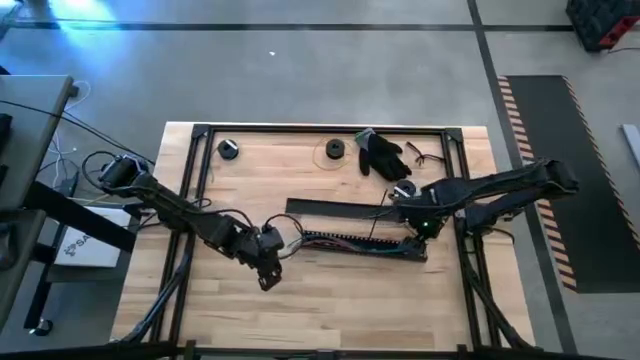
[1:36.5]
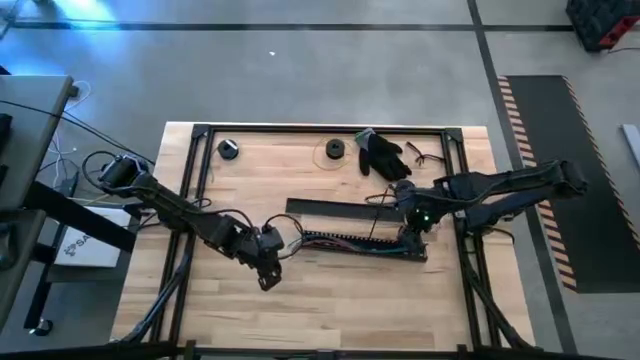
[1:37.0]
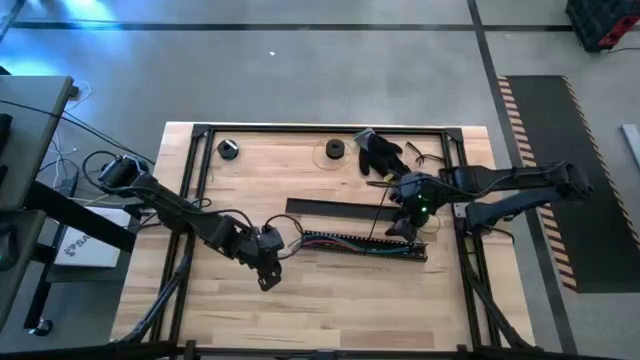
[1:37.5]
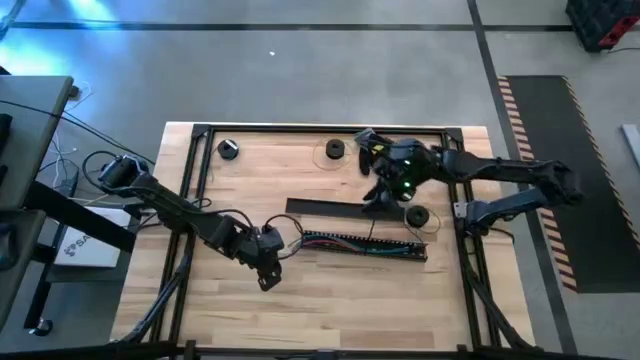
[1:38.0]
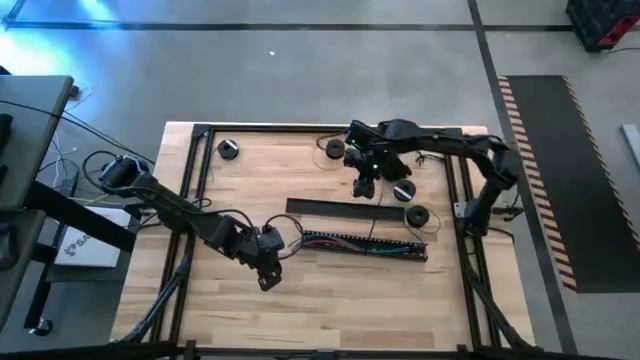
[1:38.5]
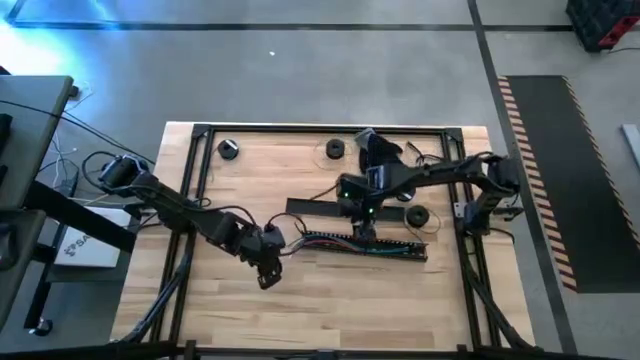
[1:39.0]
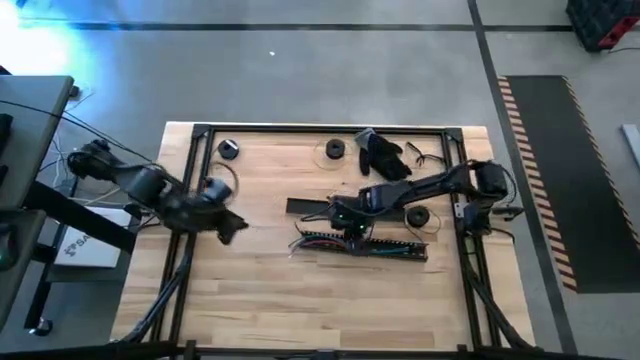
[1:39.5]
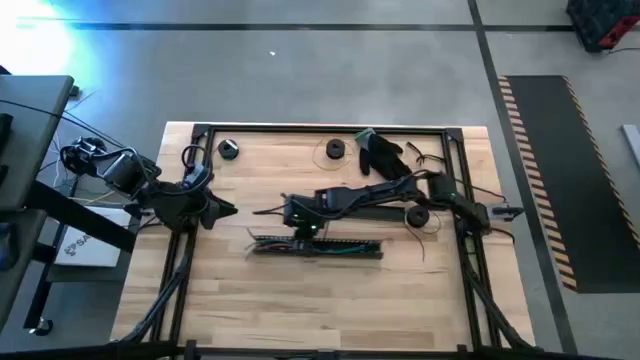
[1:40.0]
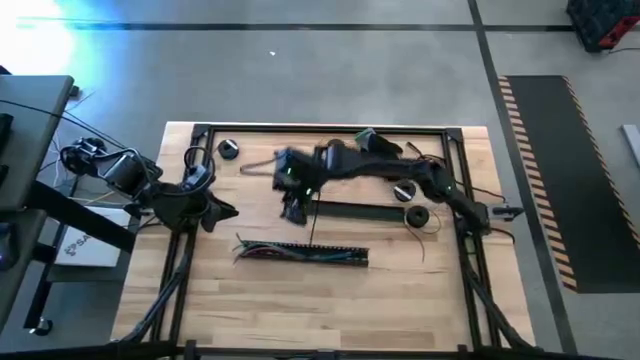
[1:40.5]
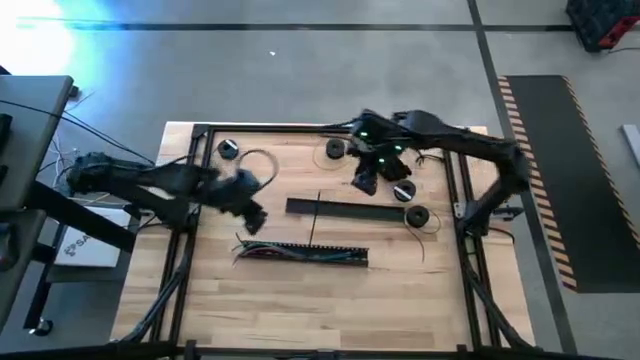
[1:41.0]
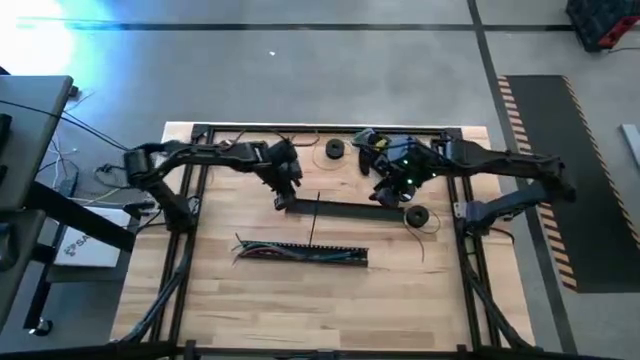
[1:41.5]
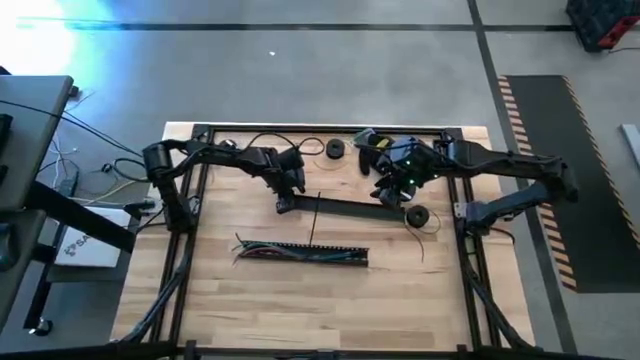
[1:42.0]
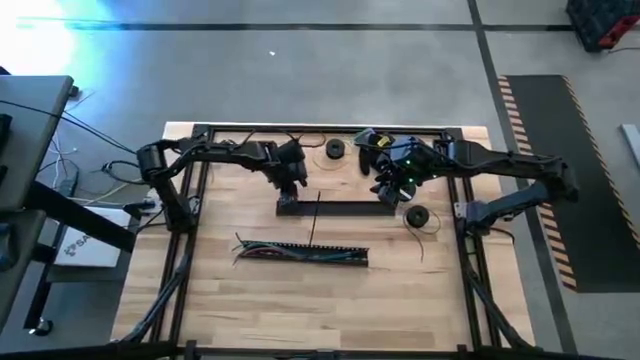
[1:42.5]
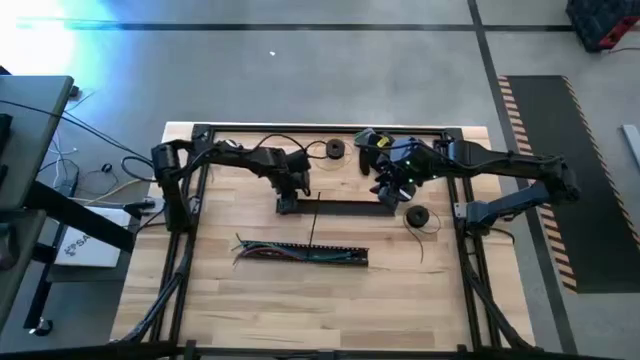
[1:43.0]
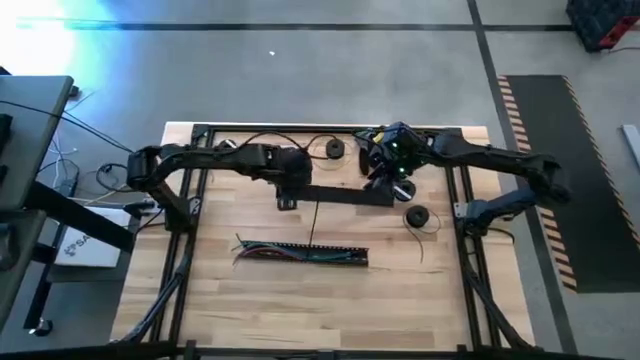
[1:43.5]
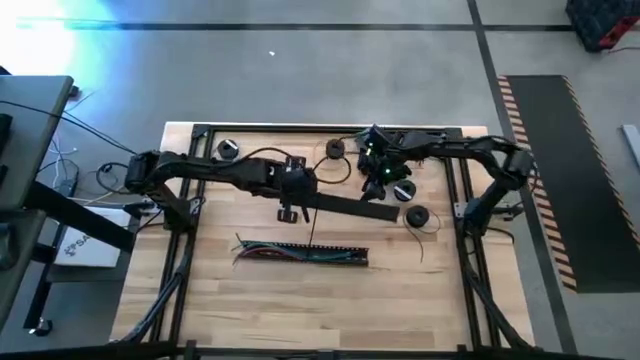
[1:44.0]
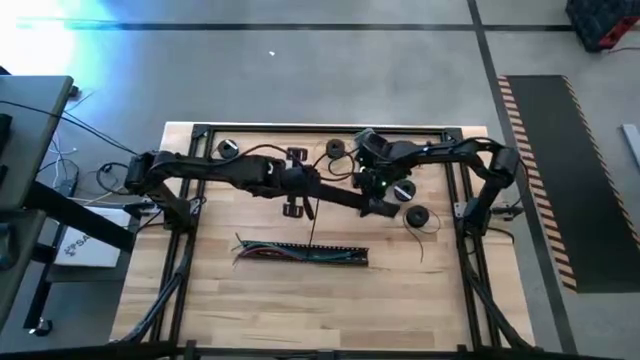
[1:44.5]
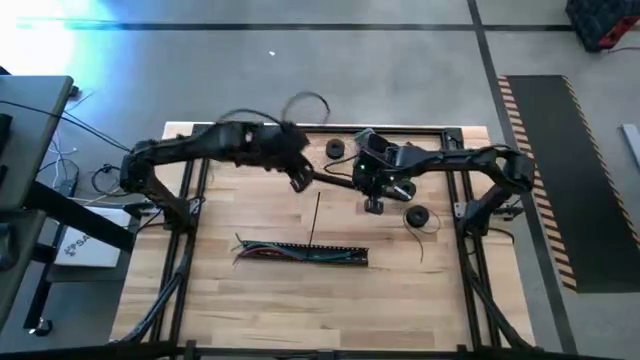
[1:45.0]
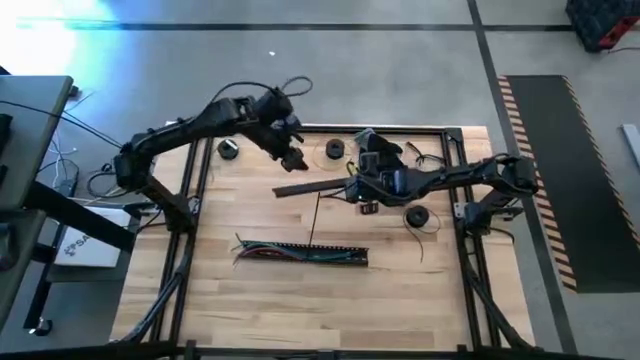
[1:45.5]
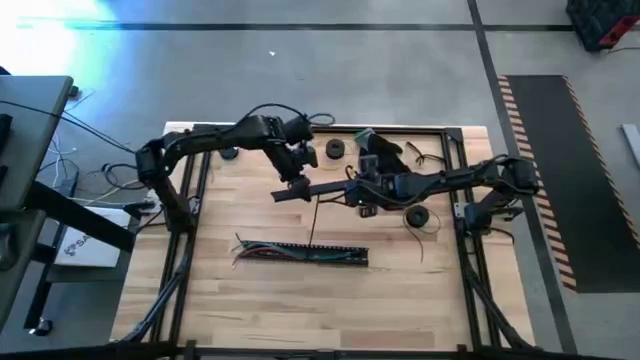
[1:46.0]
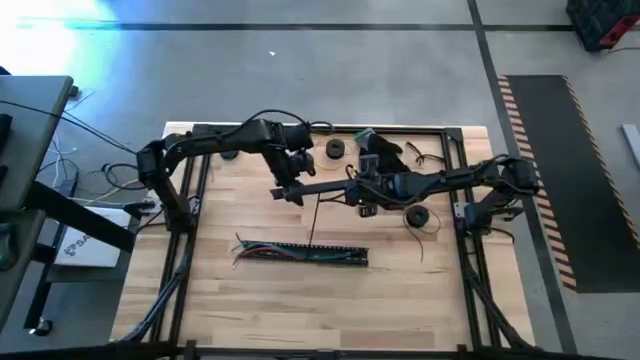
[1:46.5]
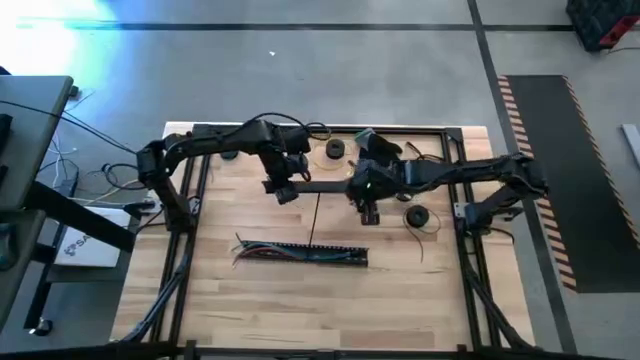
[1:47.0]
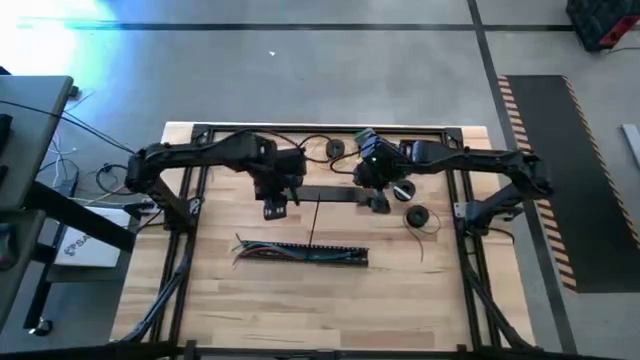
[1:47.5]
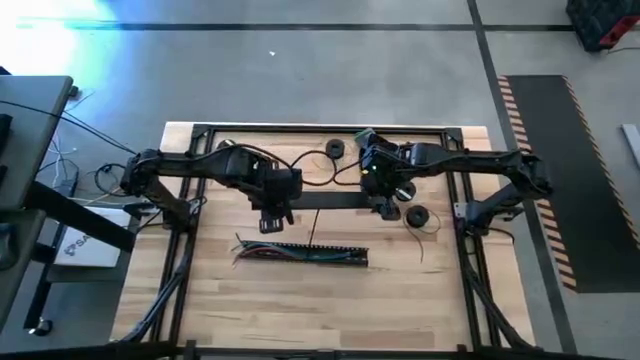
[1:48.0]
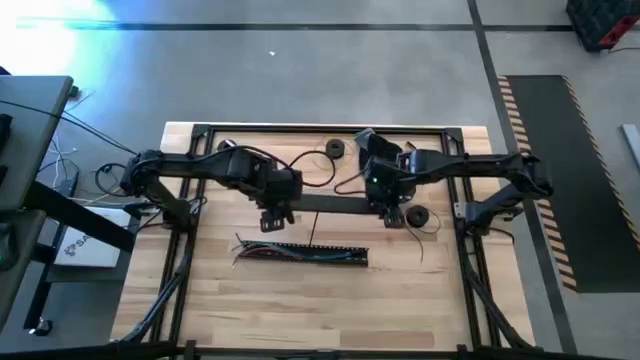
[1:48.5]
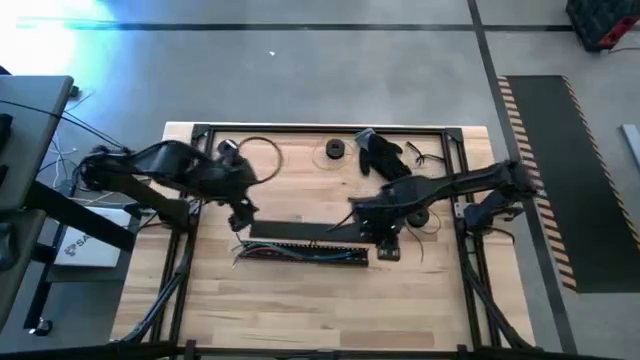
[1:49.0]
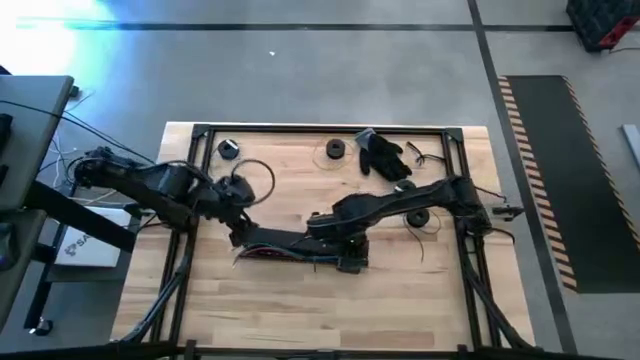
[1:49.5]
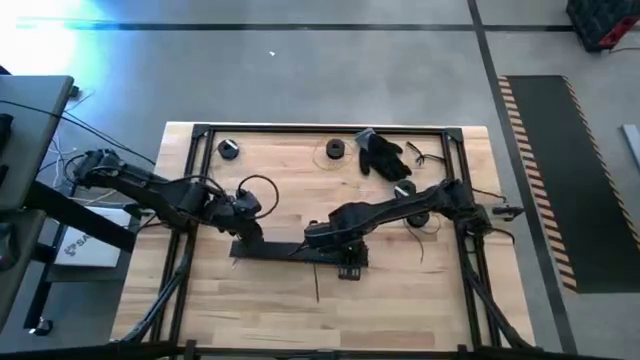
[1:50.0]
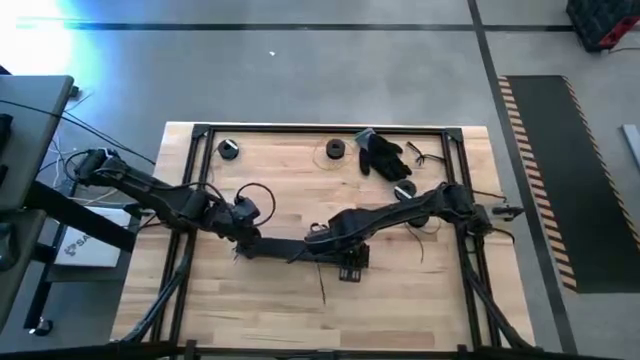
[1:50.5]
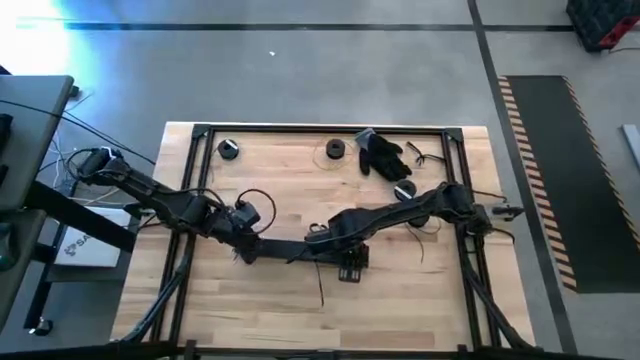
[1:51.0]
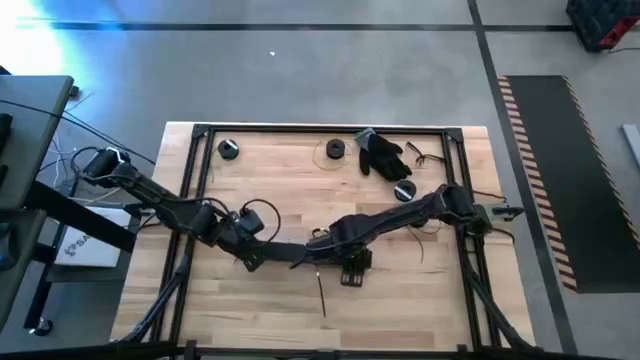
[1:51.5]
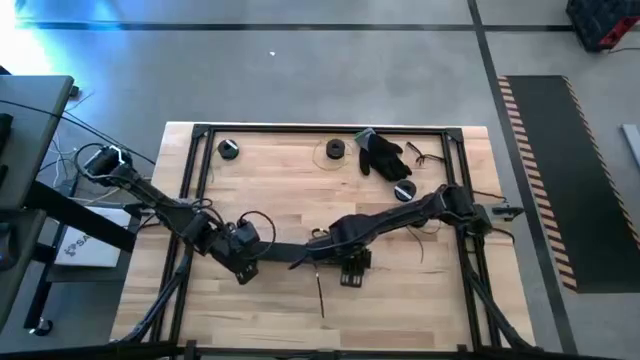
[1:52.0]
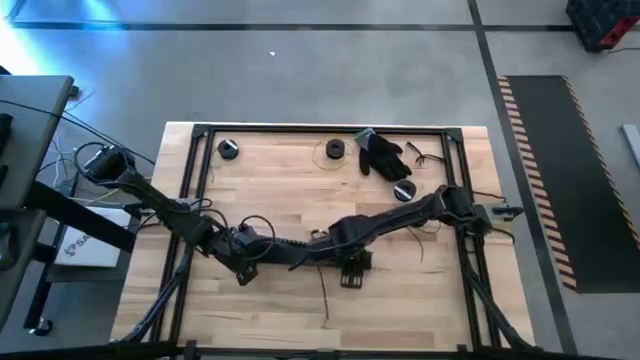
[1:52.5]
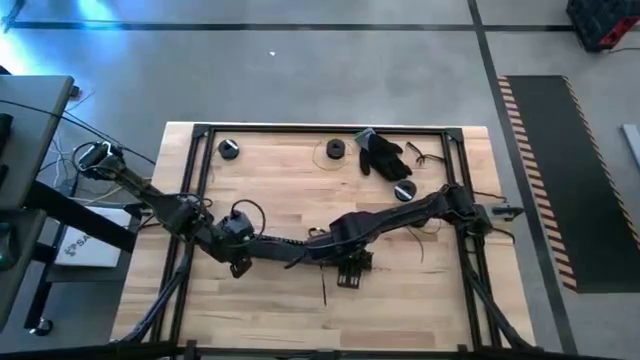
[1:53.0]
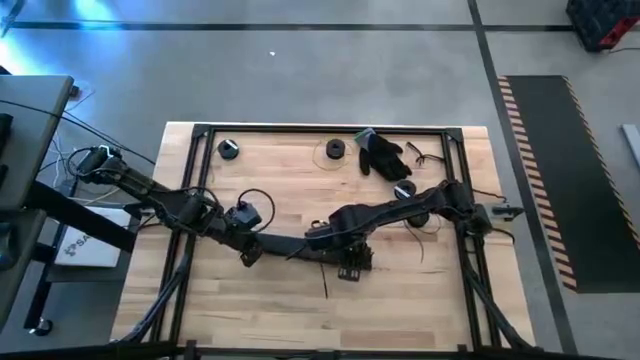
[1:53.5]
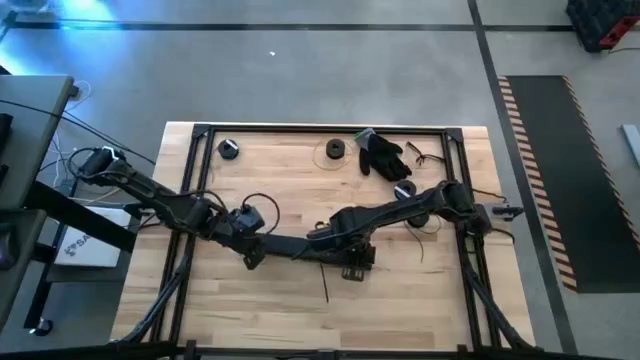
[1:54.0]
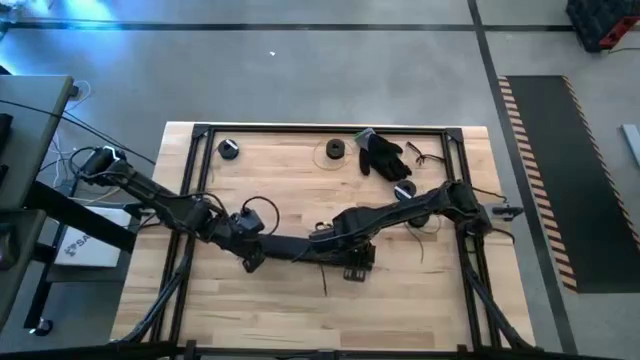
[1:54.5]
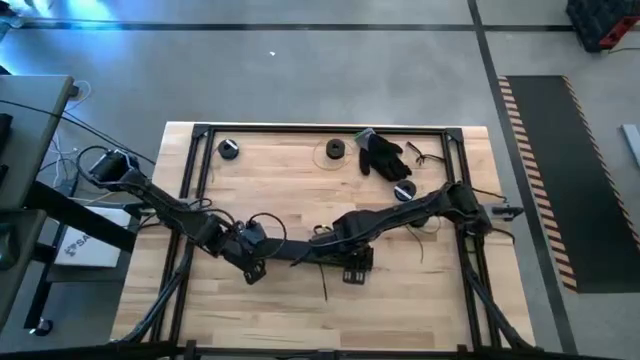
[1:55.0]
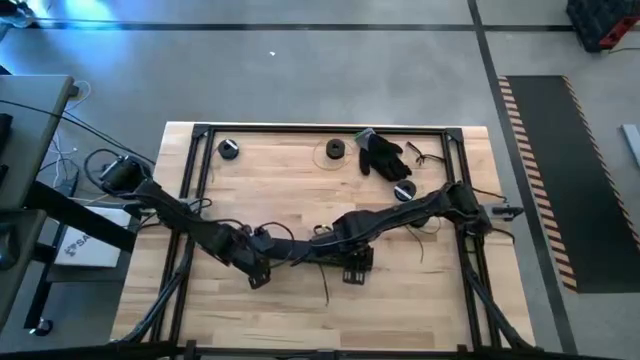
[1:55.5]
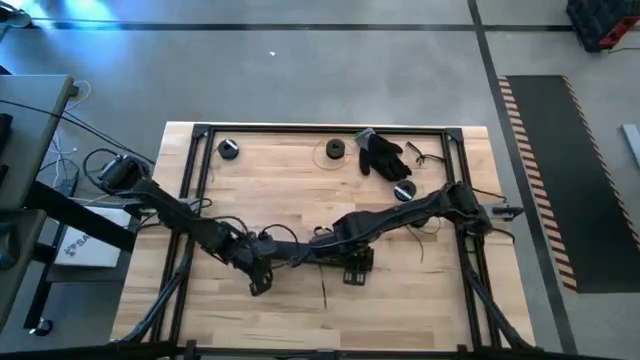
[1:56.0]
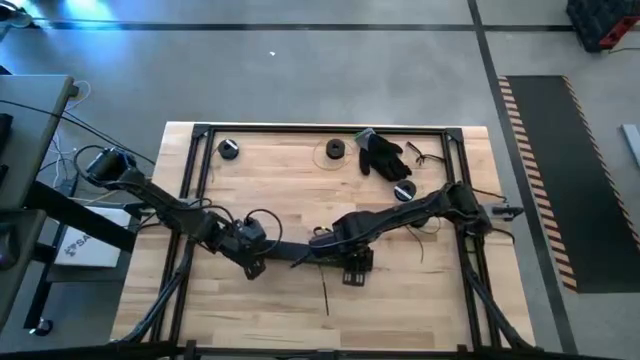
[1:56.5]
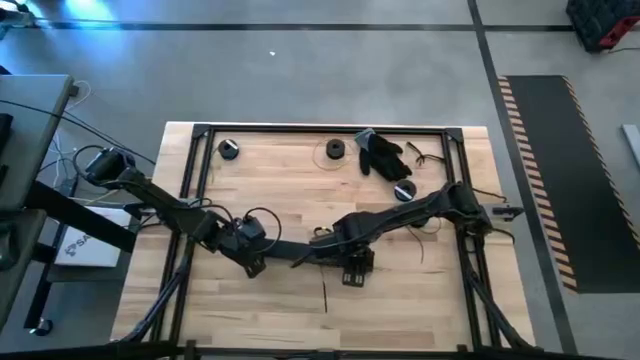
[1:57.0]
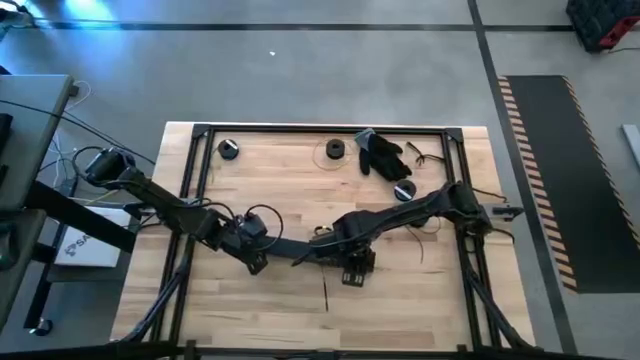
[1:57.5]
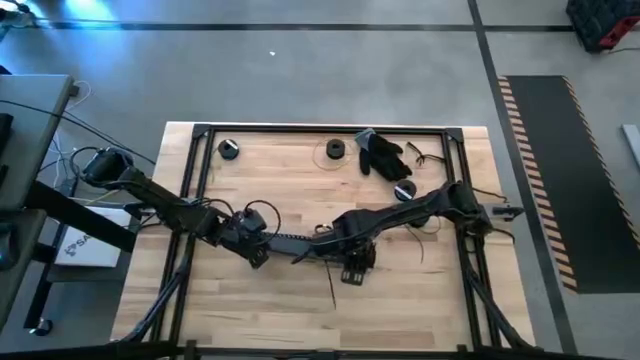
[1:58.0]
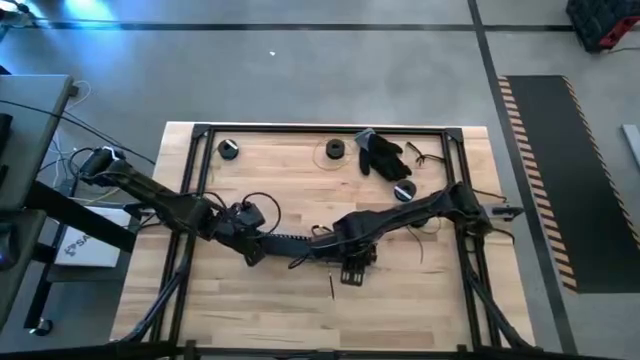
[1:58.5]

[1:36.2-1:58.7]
Task: Ziptie cables
Close the black cable duct
